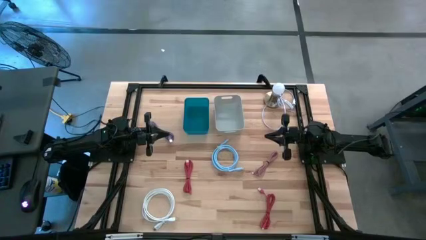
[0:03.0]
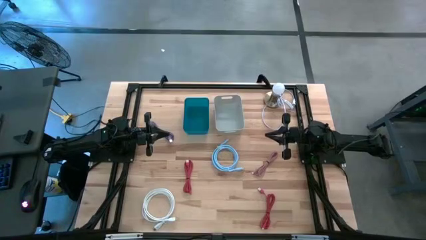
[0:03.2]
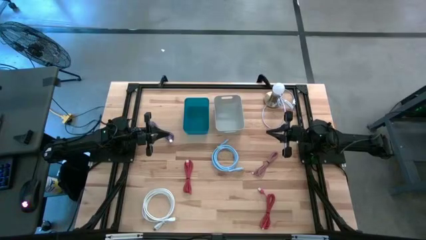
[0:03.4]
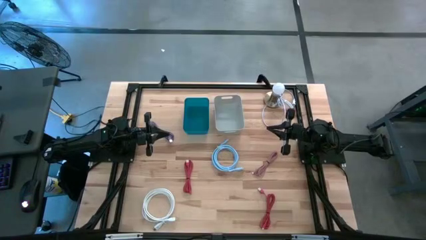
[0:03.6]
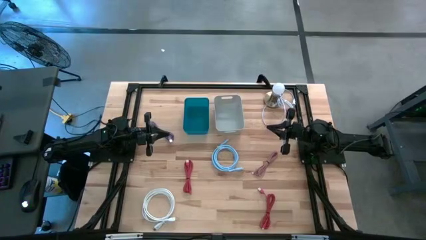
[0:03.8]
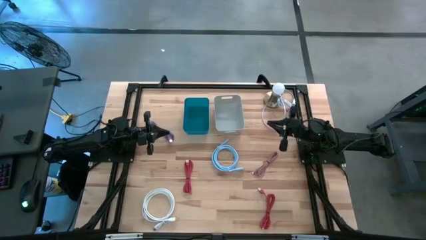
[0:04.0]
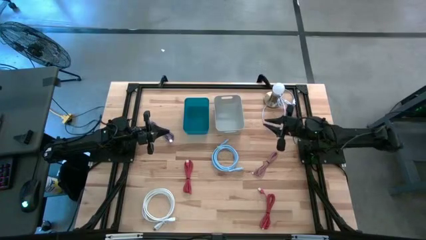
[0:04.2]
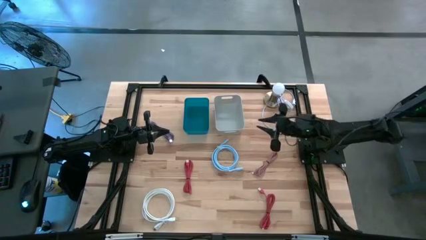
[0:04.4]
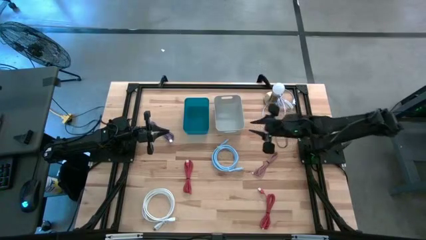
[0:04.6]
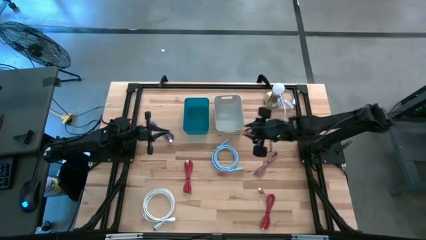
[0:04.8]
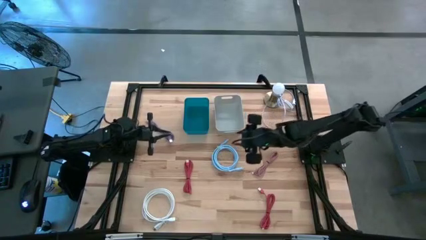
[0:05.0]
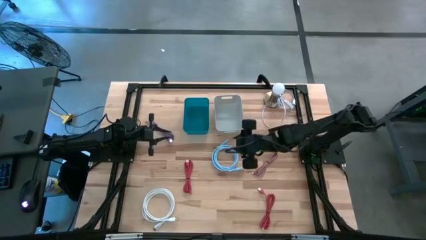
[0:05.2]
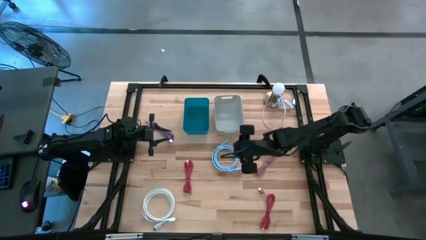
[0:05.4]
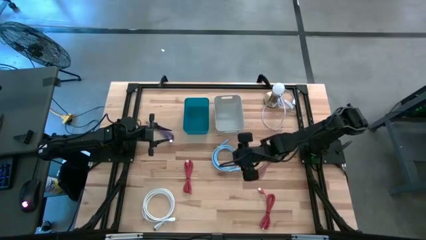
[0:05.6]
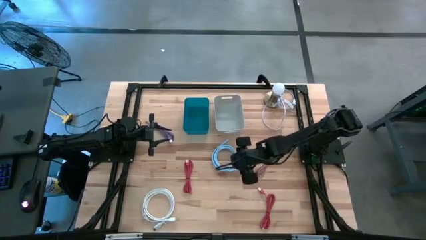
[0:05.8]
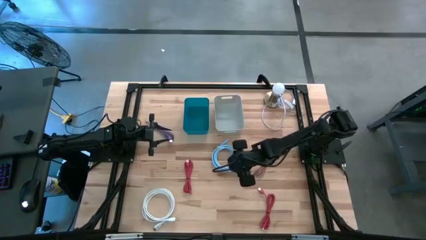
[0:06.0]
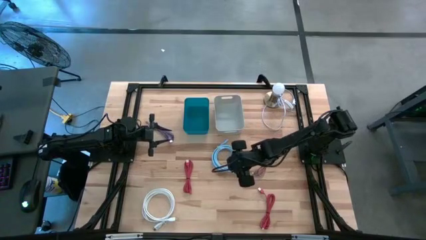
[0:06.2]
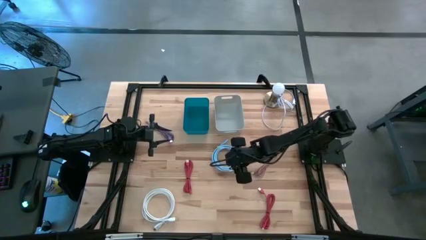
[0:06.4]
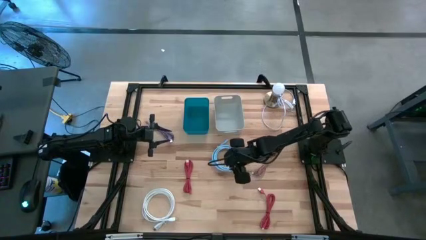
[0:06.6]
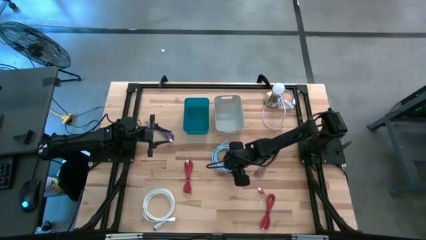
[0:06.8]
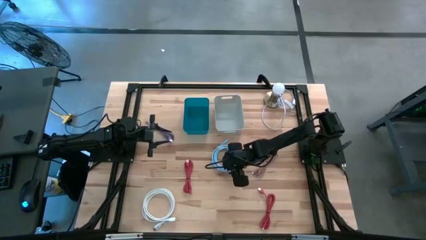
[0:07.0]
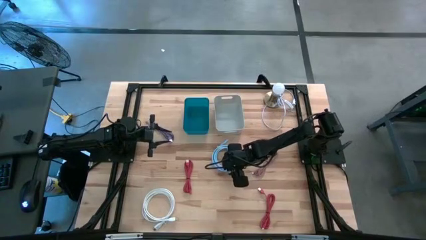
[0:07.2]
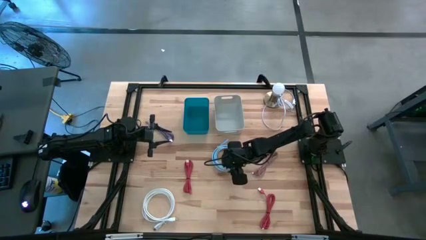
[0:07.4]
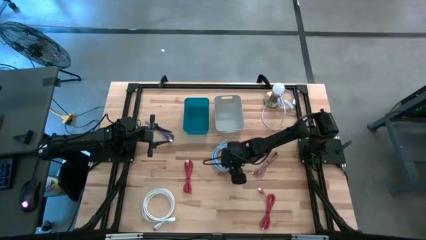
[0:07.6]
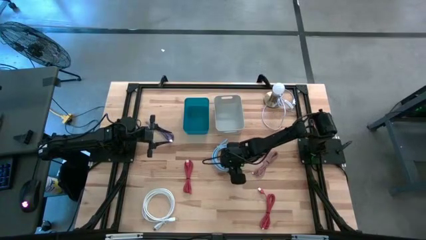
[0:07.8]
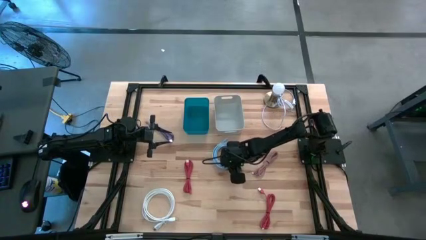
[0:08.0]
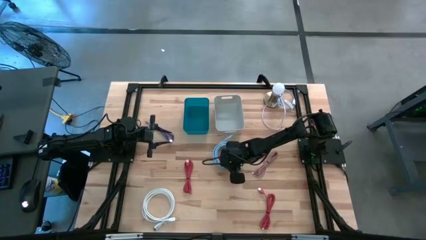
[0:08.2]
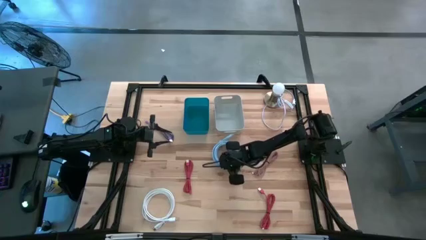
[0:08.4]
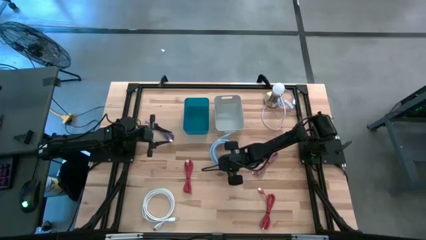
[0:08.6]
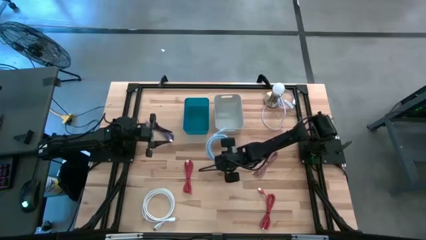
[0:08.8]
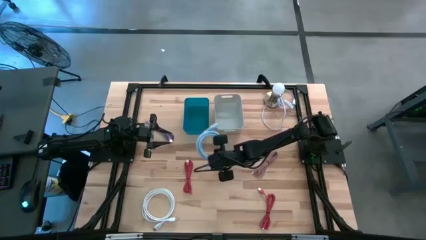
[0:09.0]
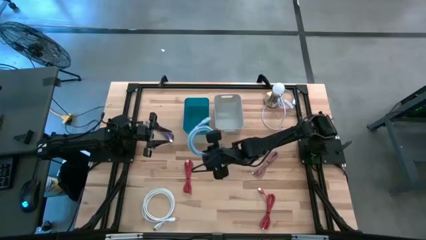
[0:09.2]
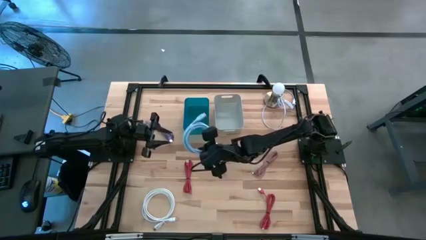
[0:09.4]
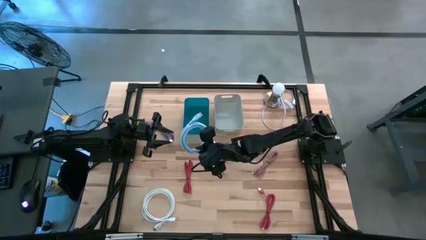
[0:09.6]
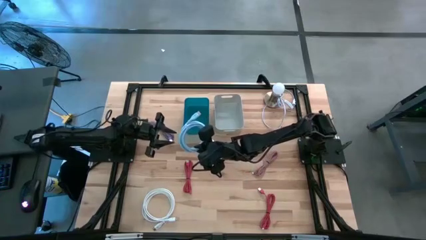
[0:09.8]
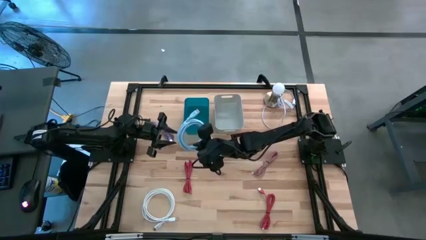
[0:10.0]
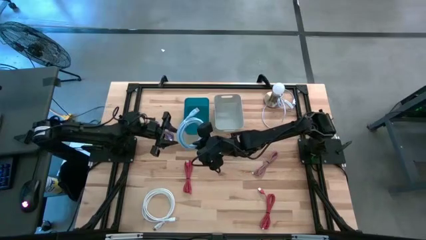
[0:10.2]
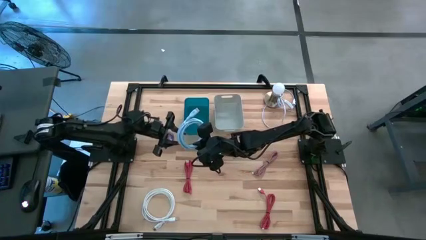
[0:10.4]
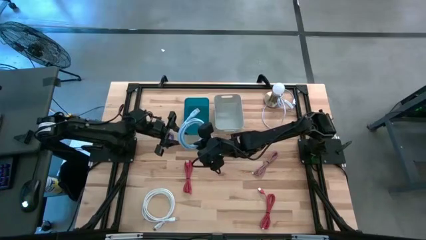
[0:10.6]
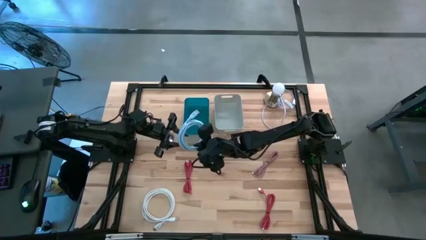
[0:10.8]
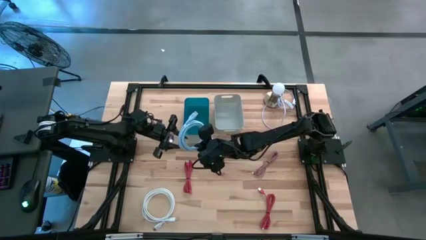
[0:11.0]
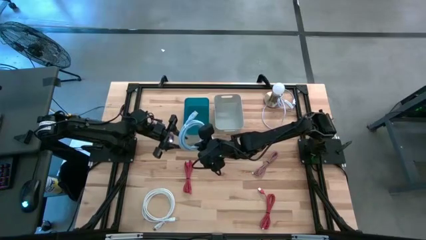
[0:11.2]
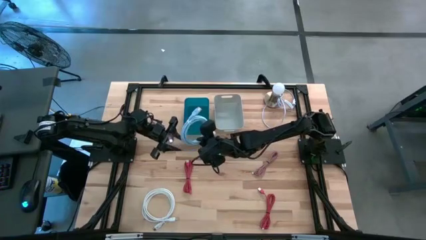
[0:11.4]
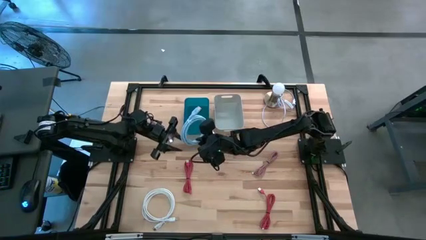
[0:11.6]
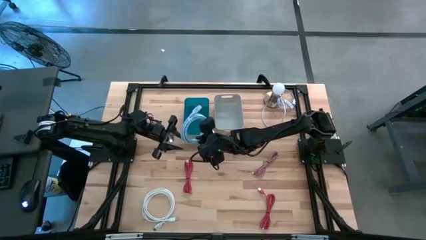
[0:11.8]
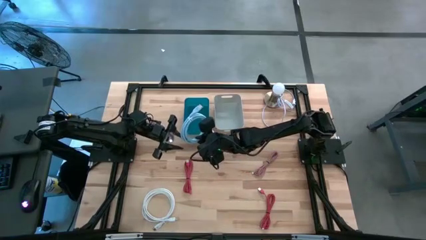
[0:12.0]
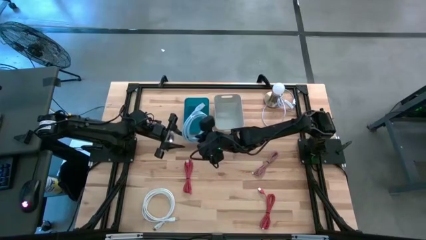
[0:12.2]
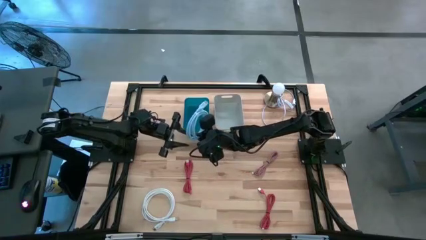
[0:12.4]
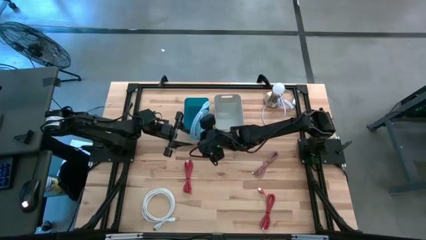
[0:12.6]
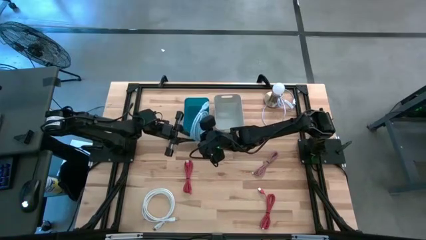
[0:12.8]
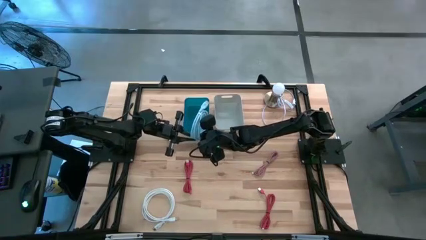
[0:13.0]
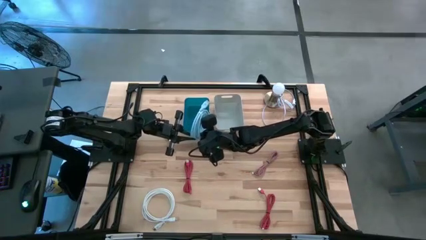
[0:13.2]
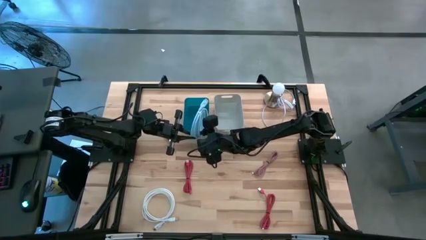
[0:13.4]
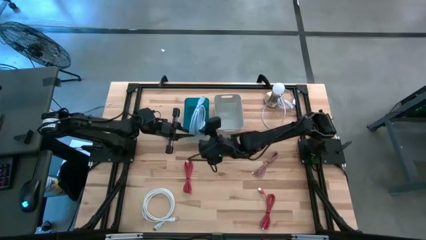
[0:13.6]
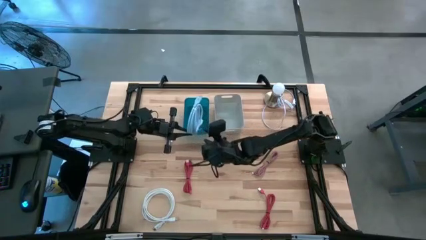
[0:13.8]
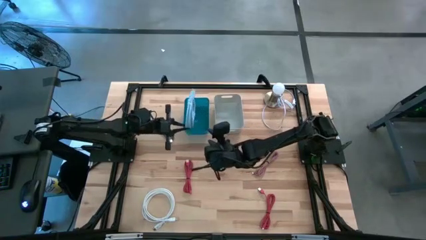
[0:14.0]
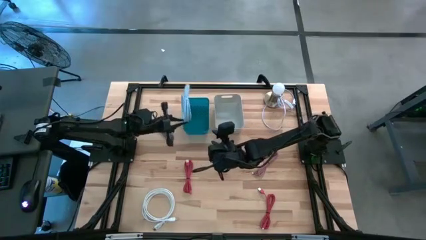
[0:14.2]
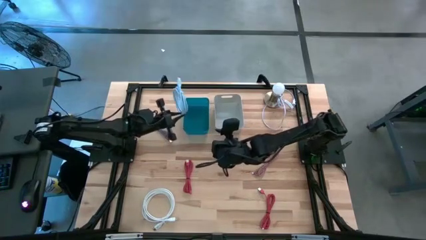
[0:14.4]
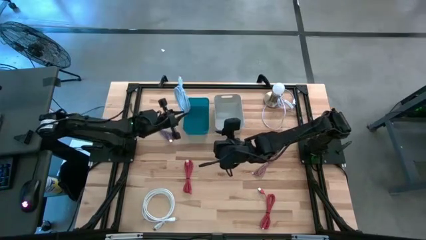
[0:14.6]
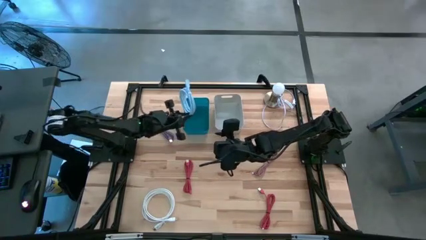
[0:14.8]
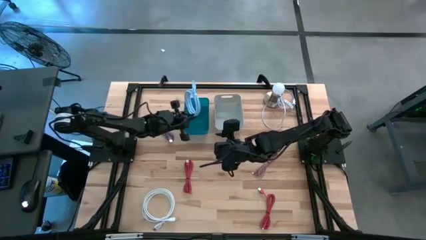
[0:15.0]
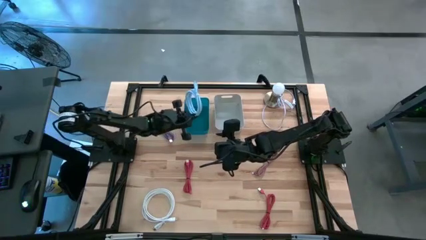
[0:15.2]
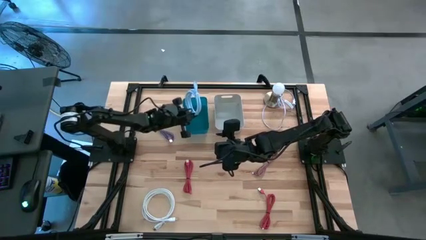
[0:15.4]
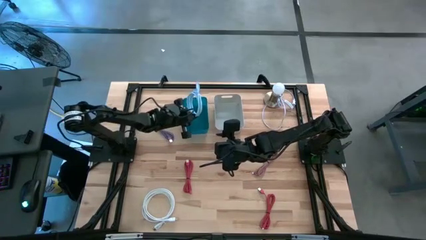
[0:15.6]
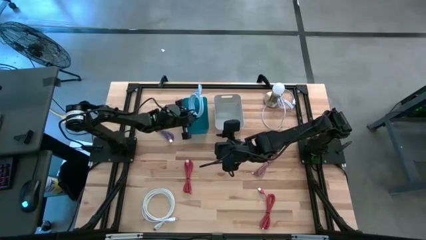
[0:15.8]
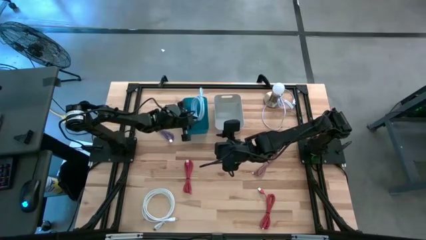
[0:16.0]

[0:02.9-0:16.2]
Task: Pick & Place USB Port
Put the light blue HDMI cable into the blue bin
